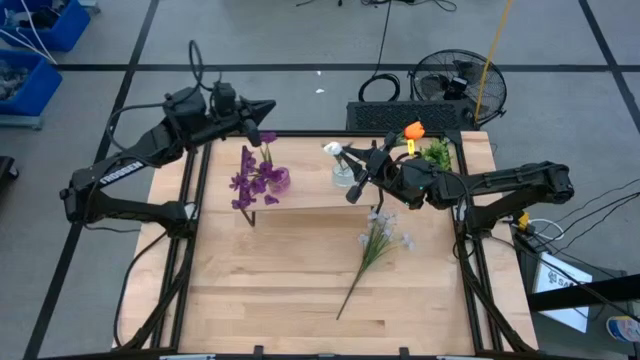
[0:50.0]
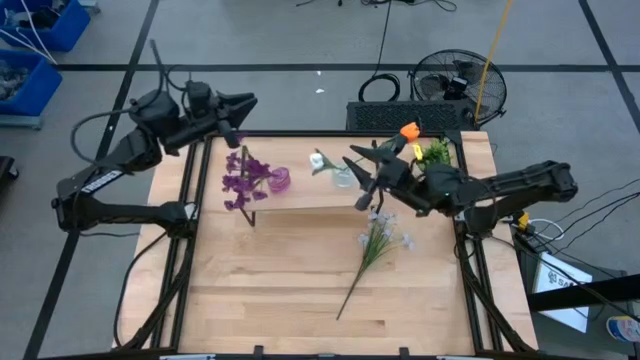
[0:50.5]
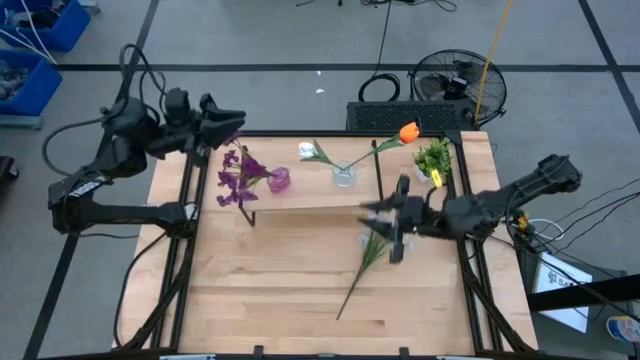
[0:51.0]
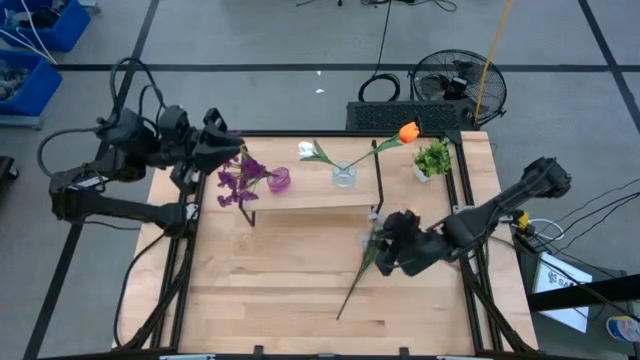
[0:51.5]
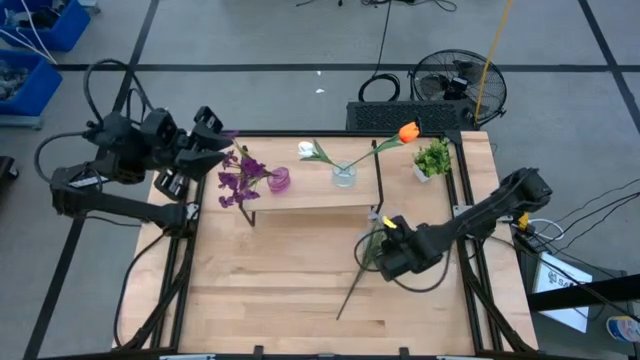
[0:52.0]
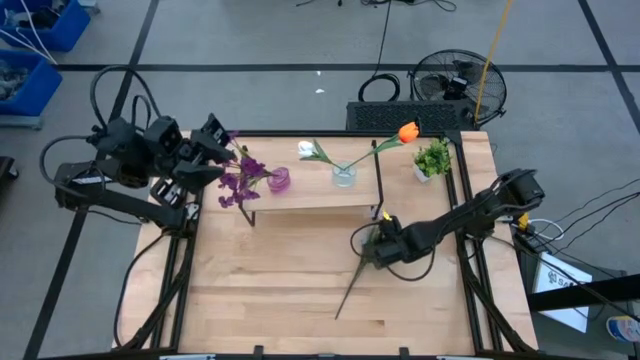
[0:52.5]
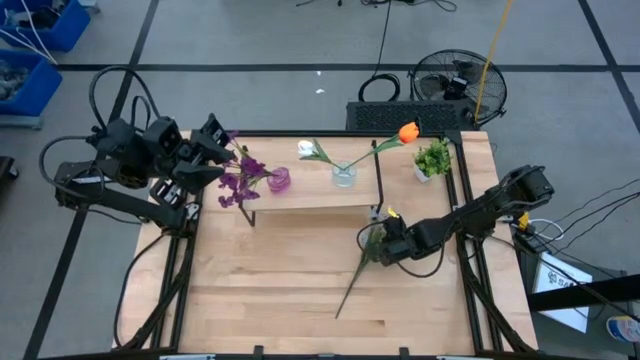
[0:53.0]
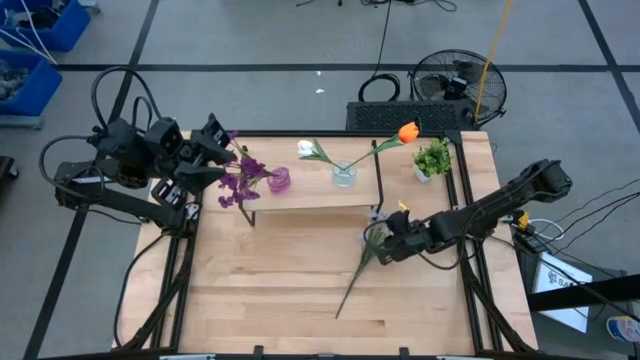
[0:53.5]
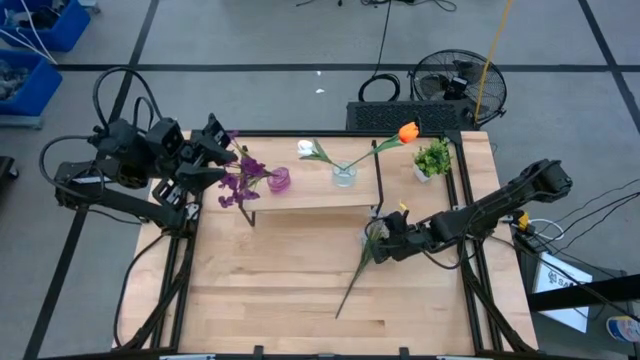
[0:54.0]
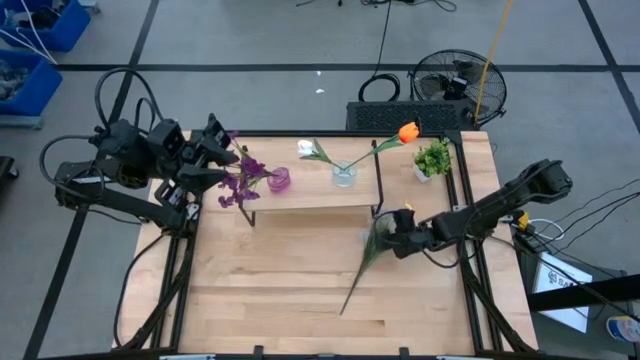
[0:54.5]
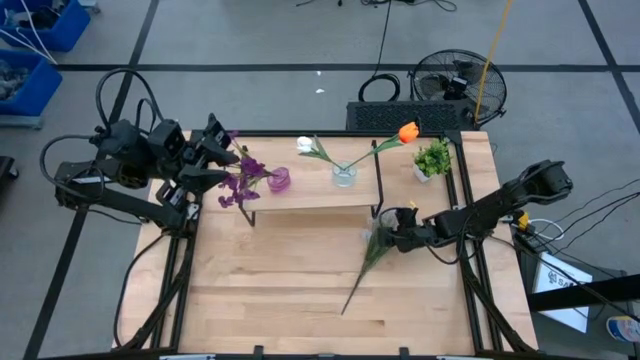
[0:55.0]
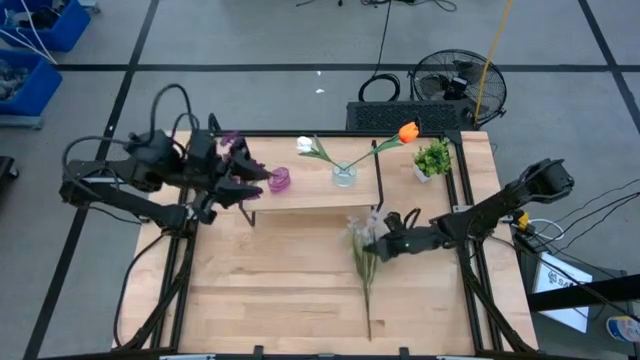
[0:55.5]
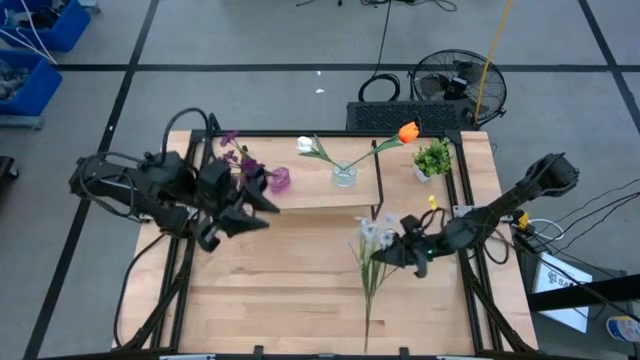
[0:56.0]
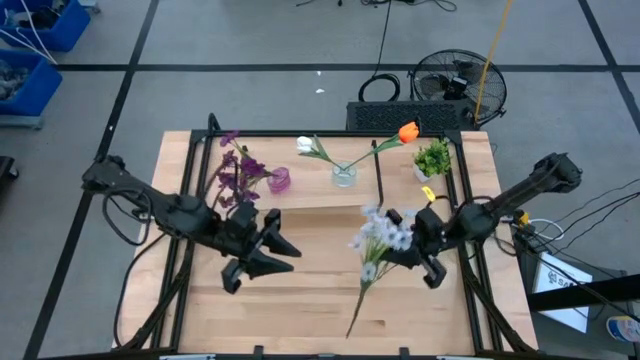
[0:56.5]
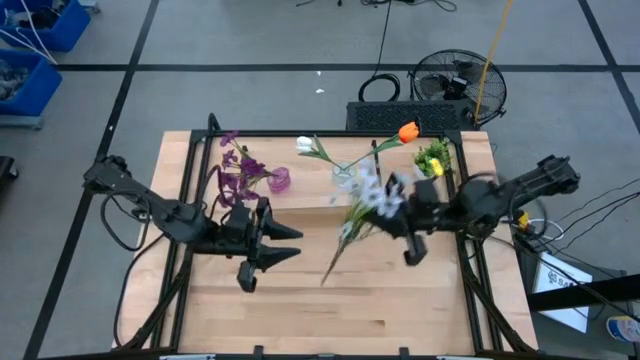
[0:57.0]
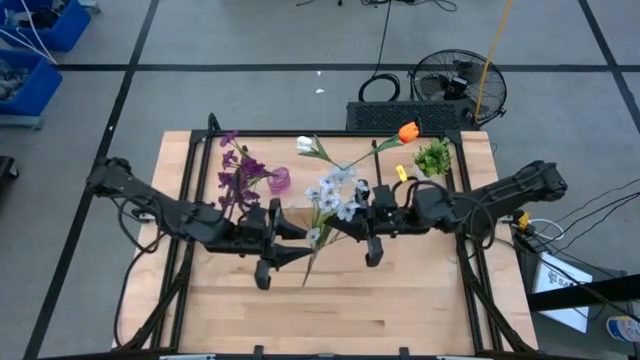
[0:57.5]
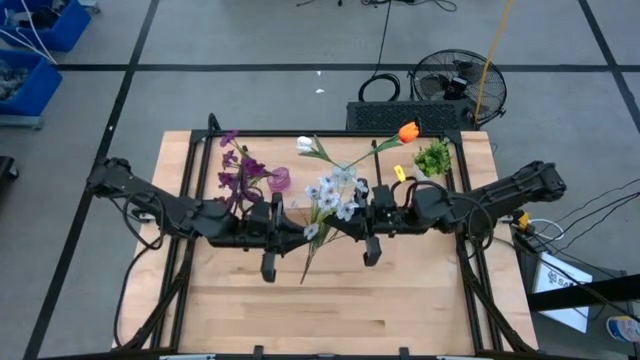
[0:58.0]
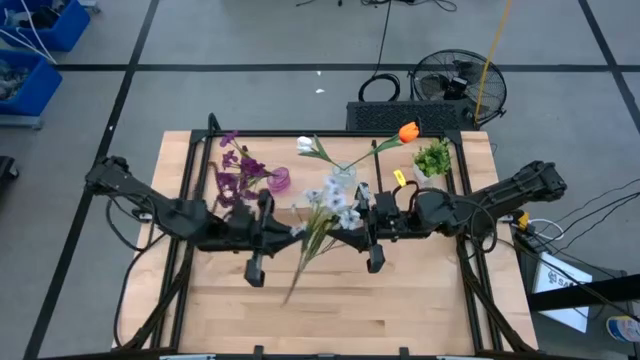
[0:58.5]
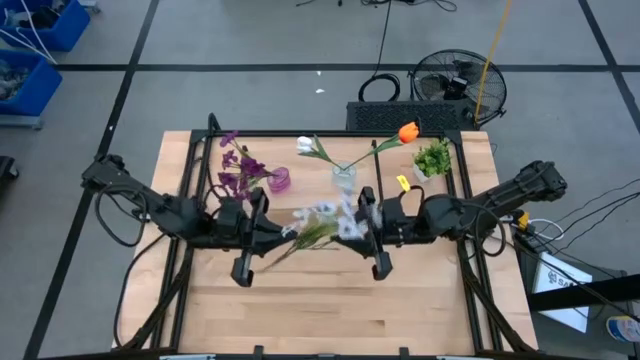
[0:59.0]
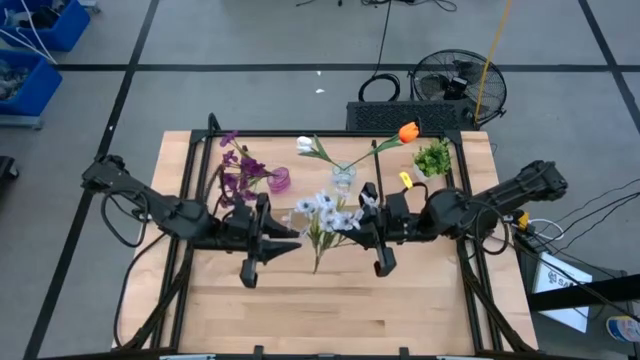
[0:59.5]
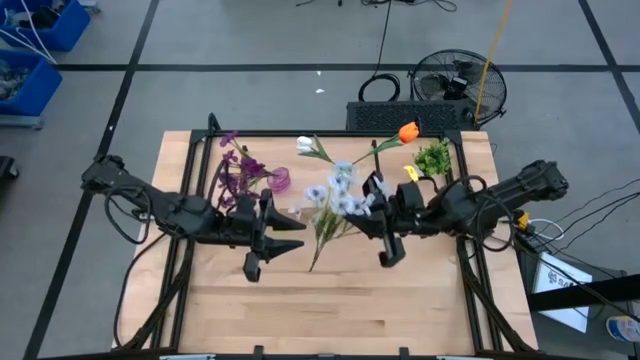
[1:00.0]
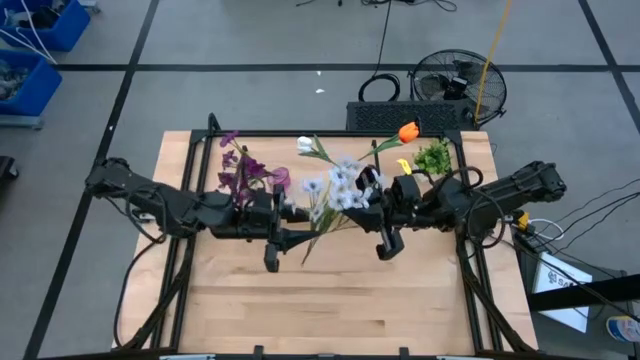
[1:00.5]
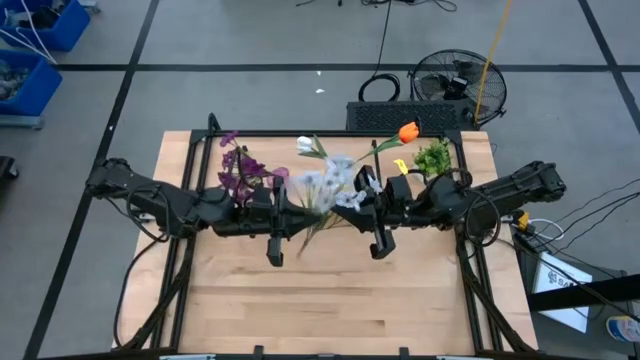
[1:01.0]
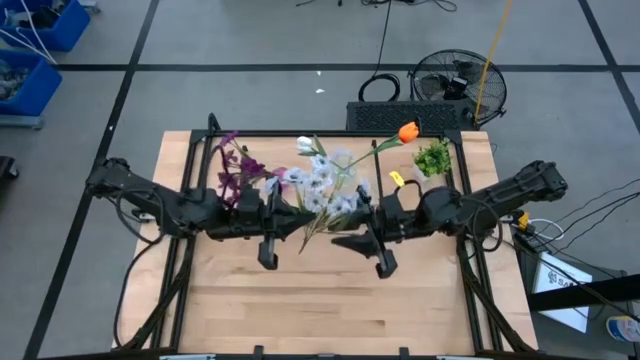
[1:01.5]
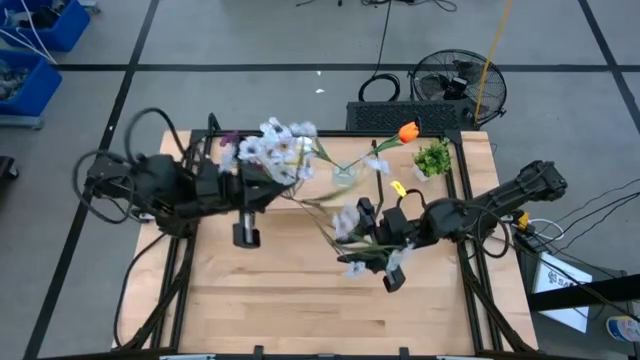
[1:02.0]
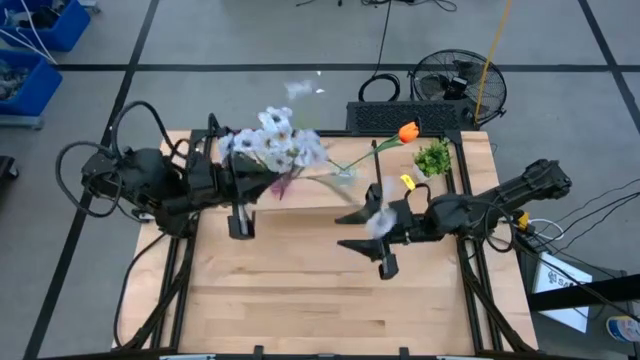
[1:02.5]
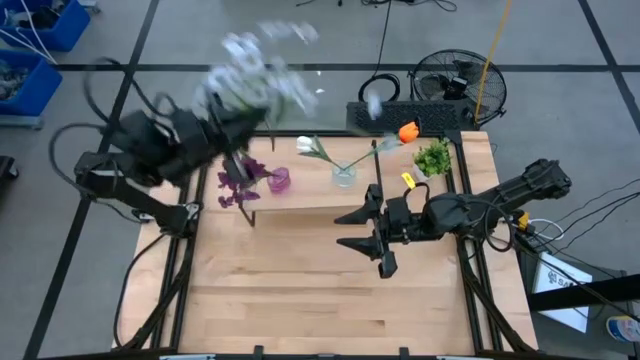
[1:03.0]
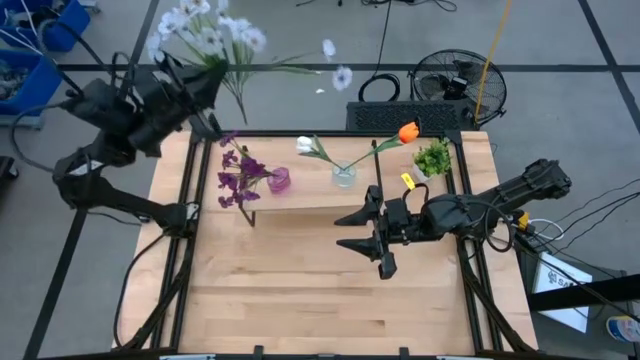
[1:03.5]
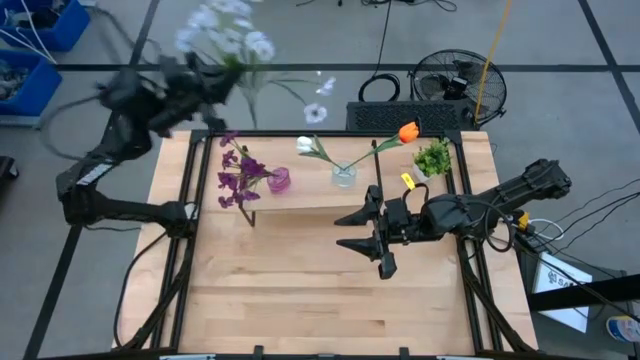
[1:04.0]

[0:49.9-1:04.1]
Task: Pick and place flowers into a vace then onto a shelf
Put the white flowers into the violet vase on the shelf

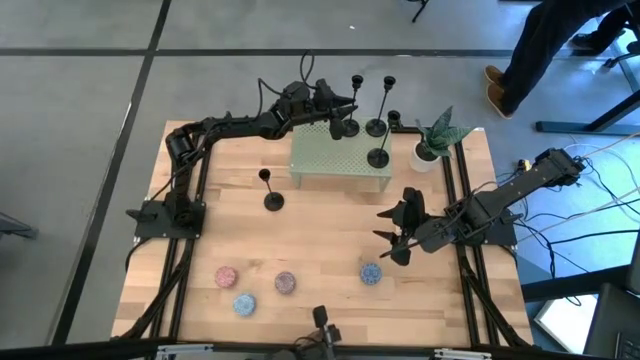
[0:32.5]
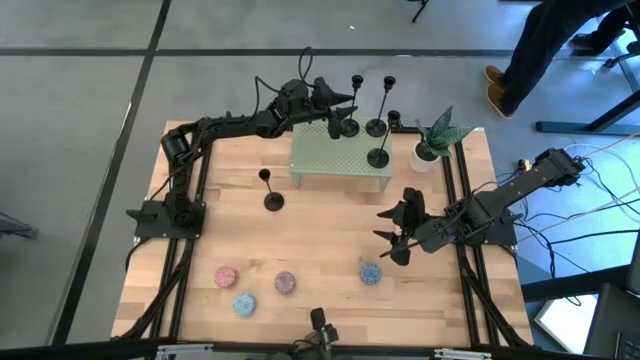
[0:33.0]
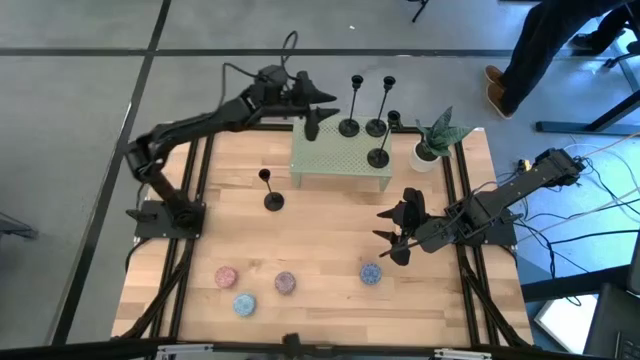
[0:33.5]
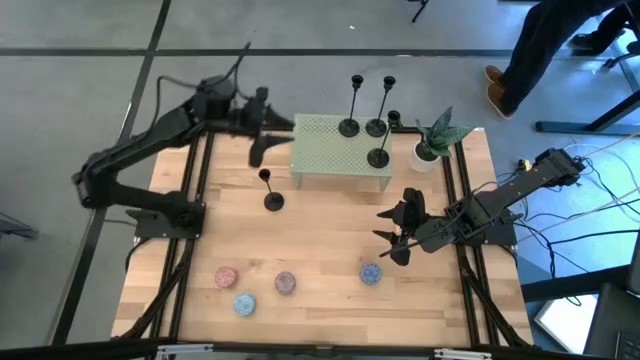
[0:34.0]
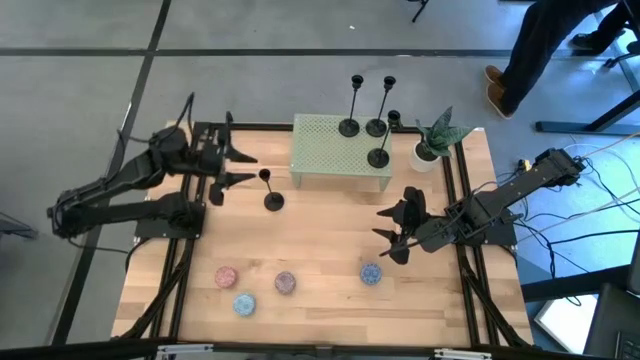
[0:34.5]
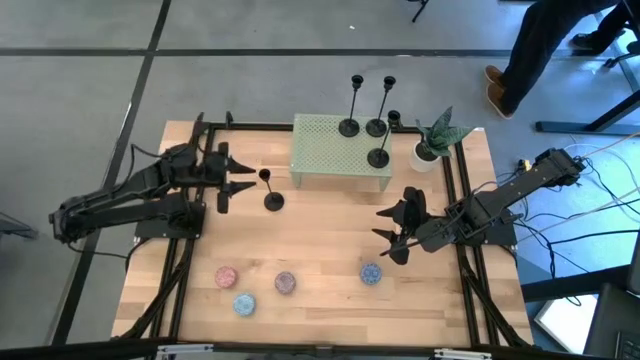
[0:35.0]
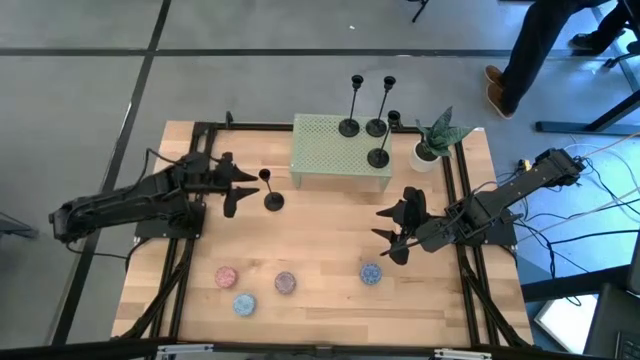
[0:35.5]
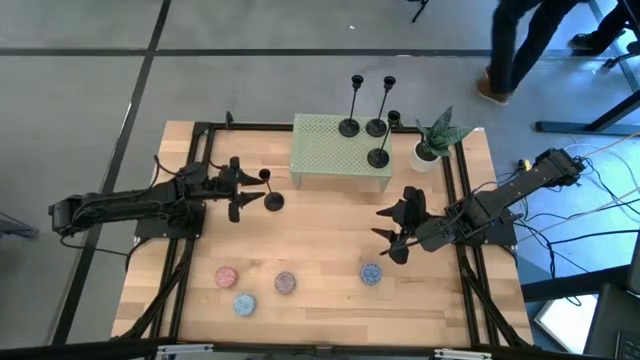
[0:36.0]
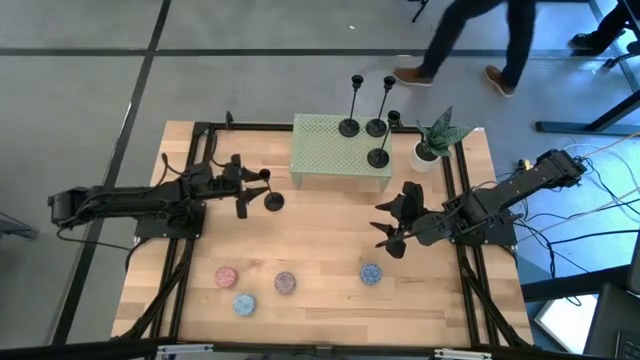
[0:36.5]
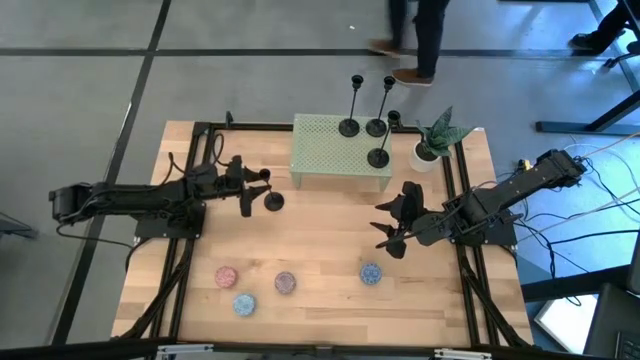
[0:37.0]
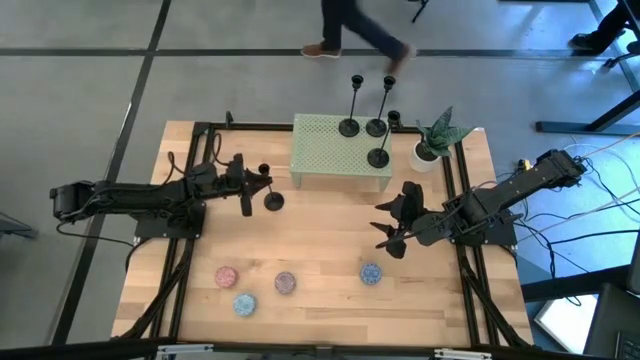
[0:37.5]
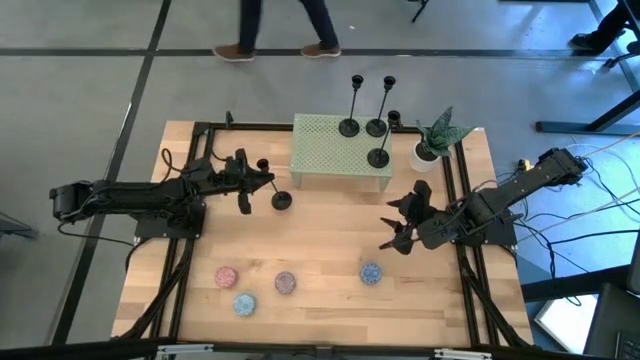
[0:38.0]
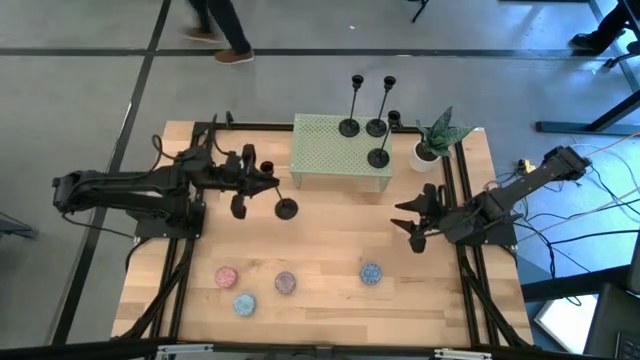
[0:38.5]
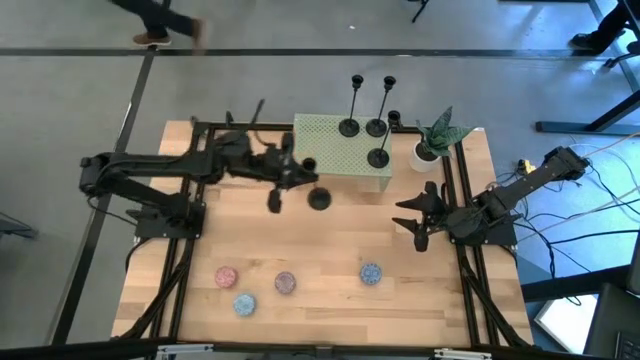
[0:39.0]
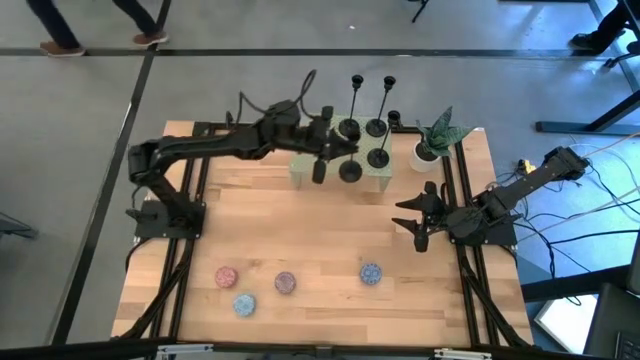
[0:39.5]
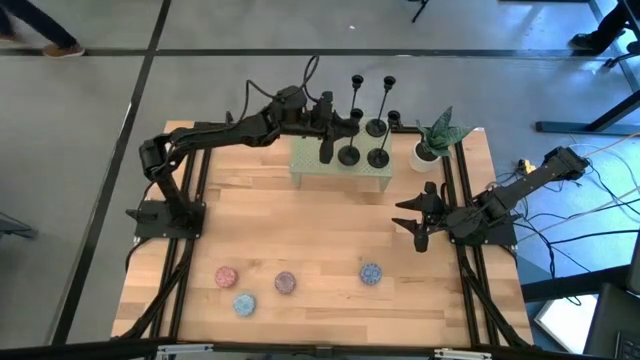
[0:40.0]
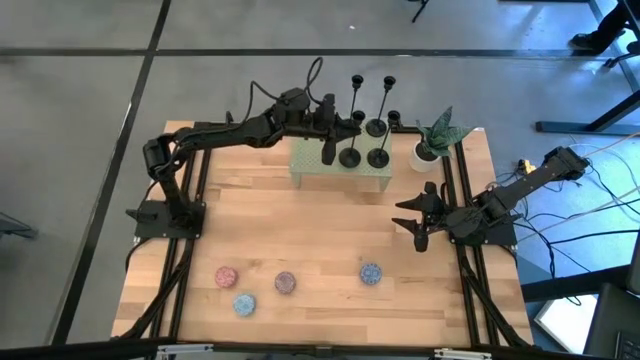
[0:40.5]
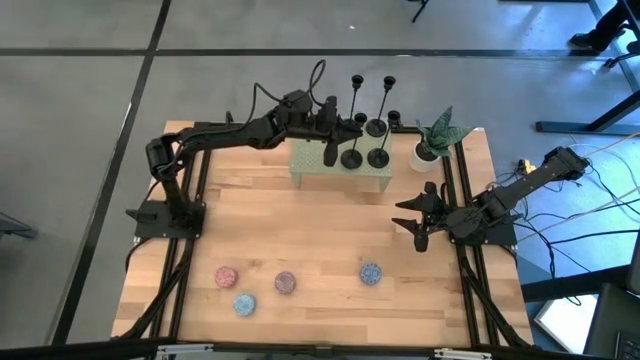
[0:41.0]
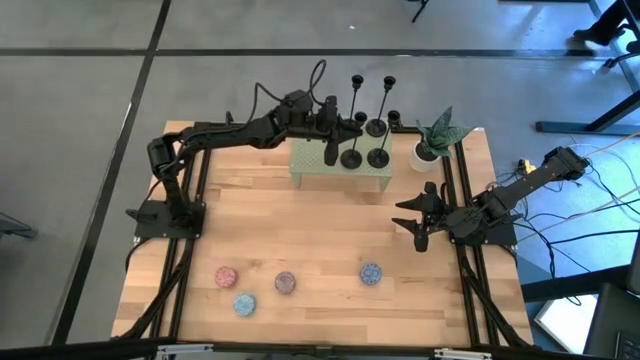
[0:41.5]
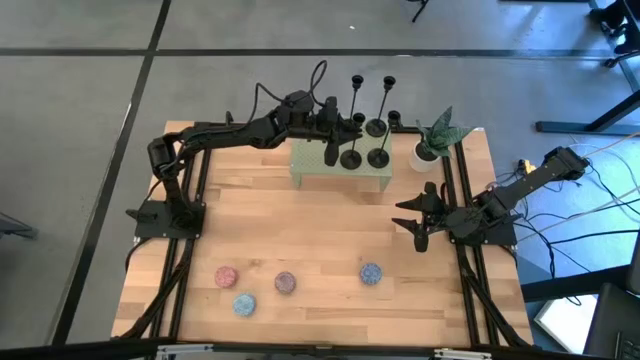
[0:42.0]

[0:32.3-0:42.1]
Task: Pick & Place candle stick holders
Align the black candle holder with the black candle holder on the shelf
